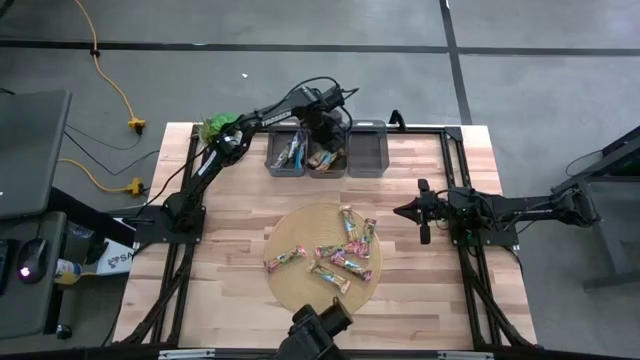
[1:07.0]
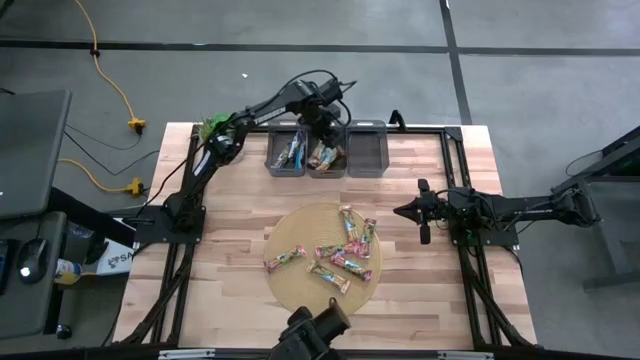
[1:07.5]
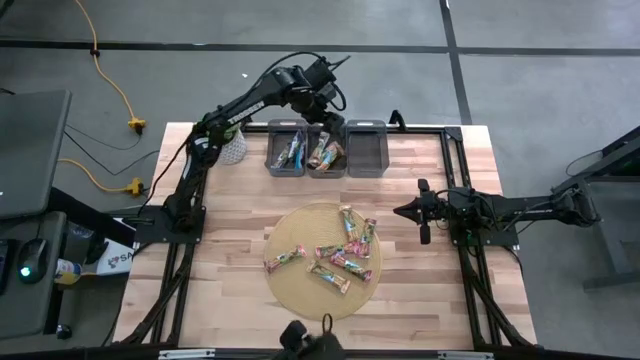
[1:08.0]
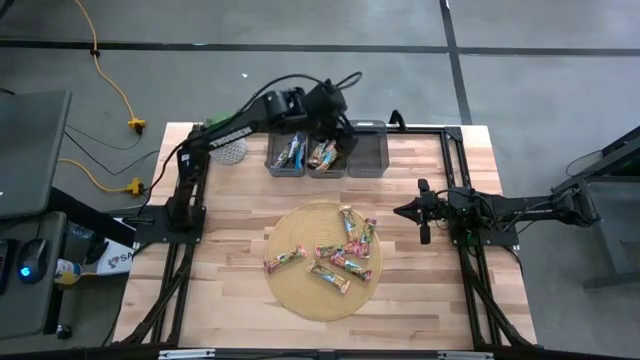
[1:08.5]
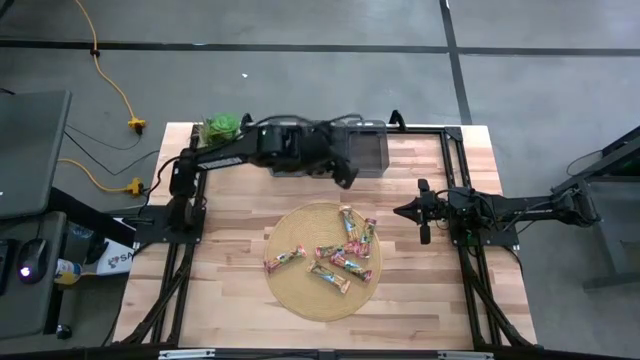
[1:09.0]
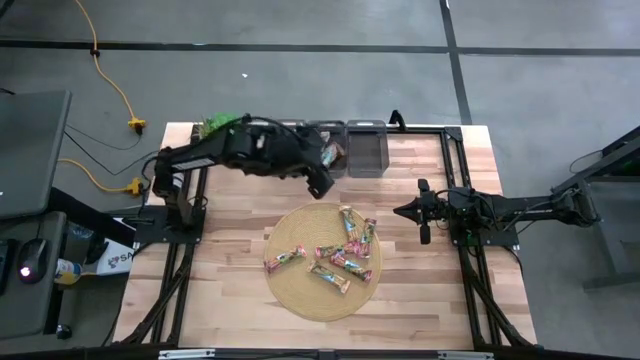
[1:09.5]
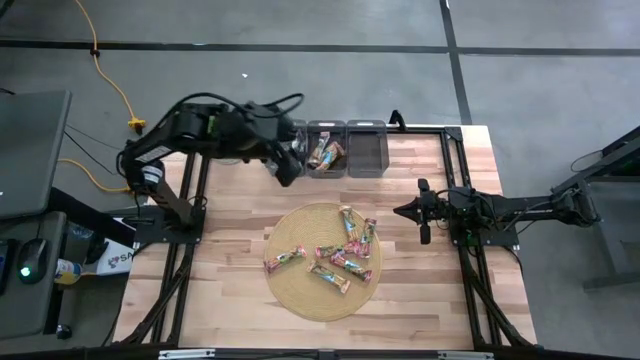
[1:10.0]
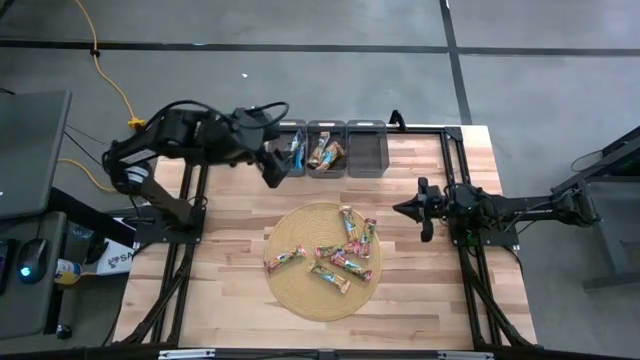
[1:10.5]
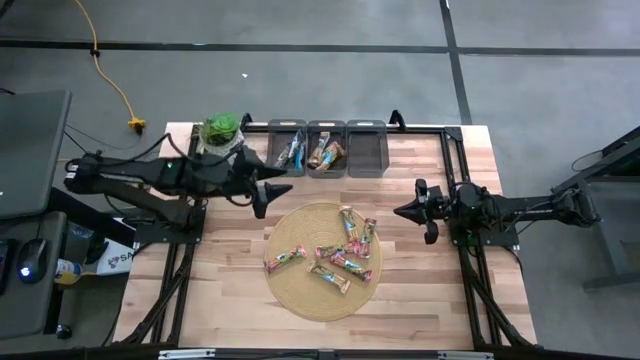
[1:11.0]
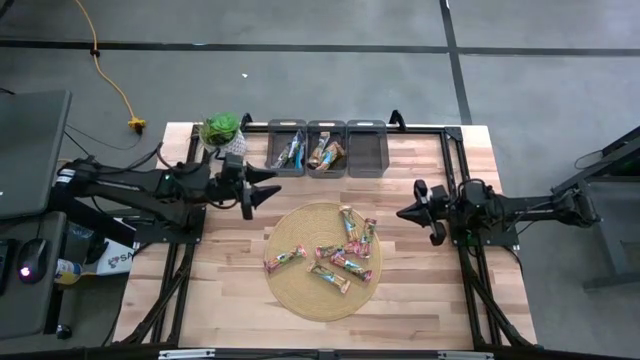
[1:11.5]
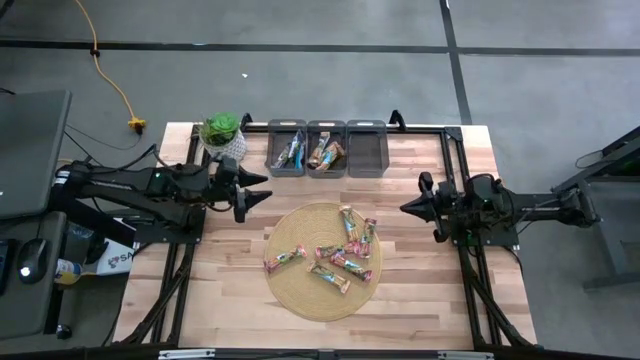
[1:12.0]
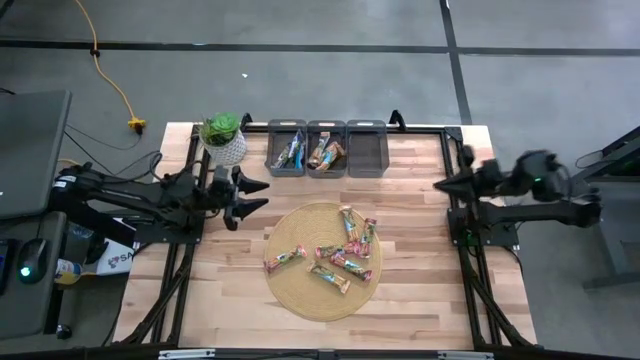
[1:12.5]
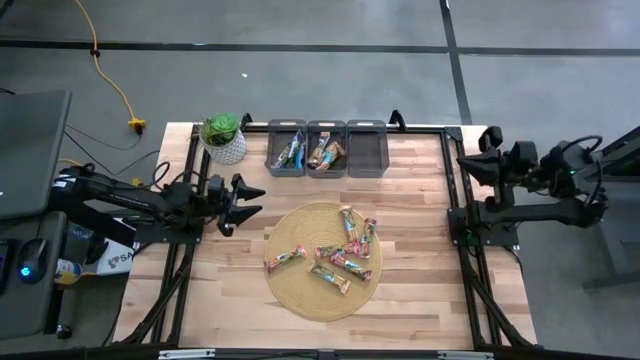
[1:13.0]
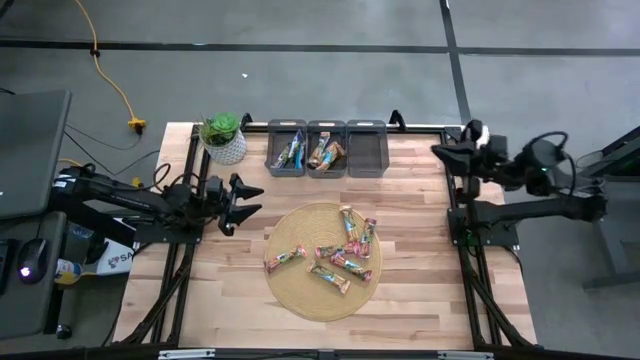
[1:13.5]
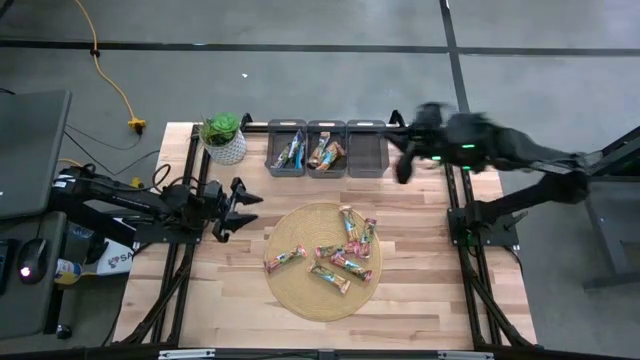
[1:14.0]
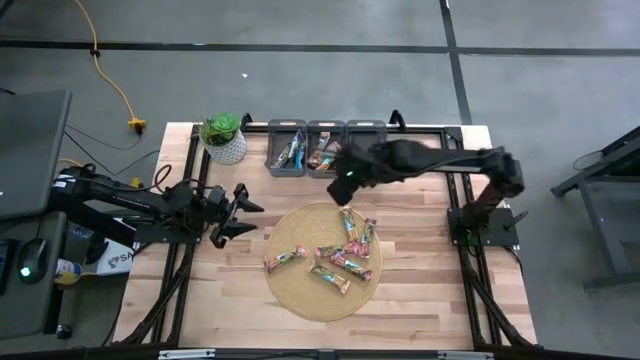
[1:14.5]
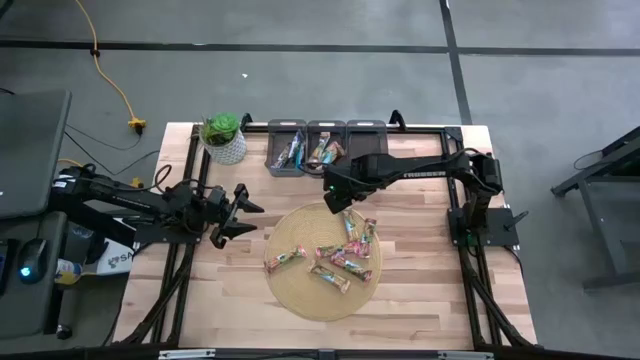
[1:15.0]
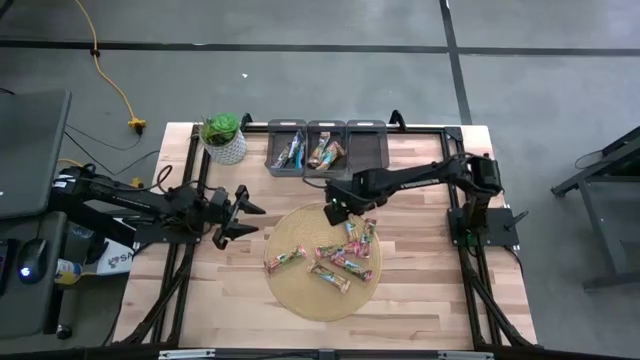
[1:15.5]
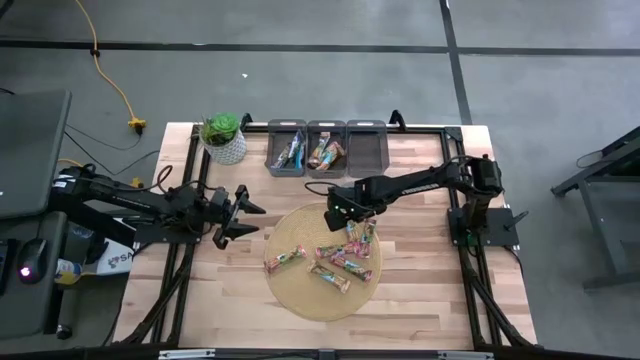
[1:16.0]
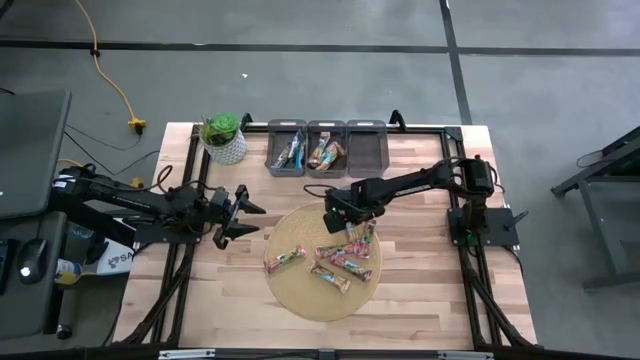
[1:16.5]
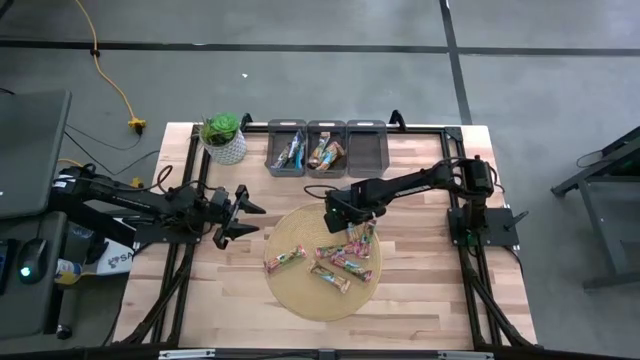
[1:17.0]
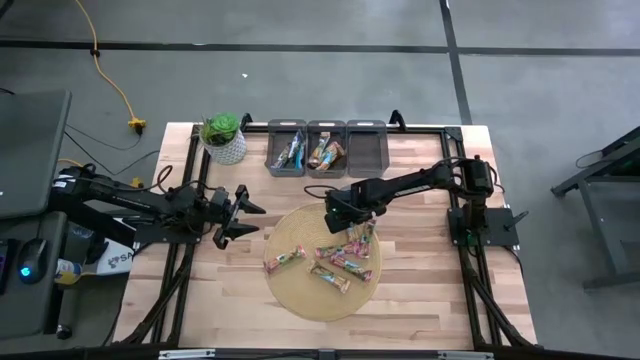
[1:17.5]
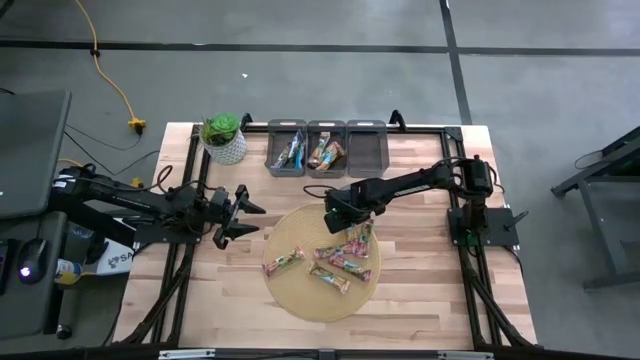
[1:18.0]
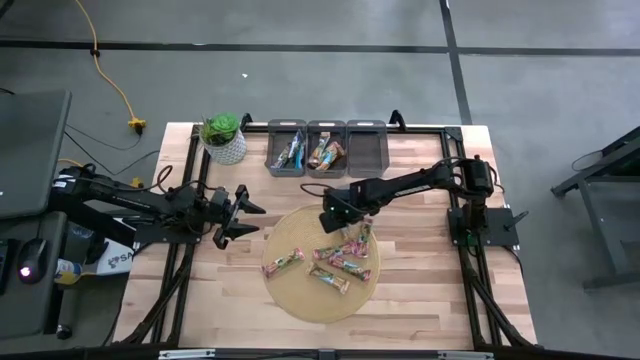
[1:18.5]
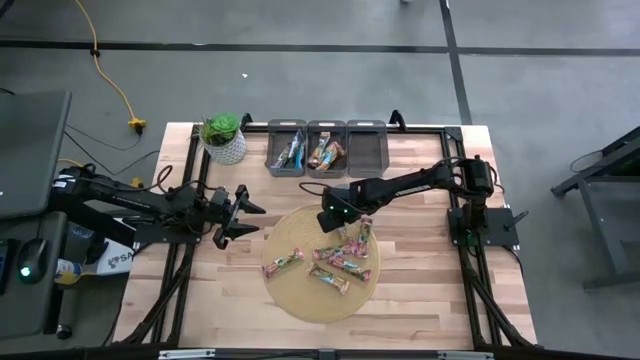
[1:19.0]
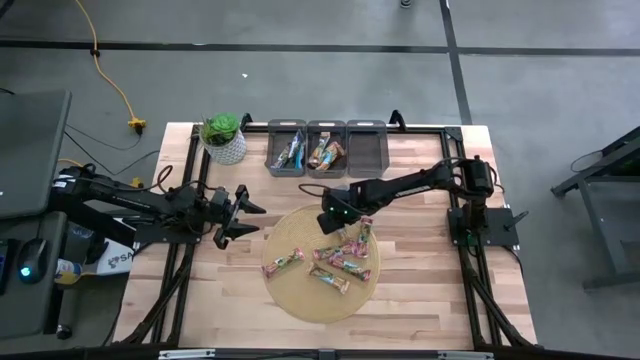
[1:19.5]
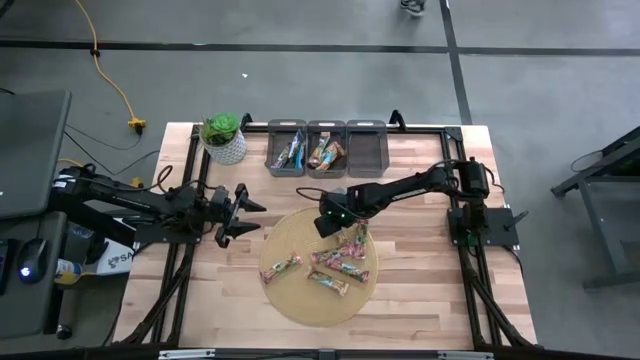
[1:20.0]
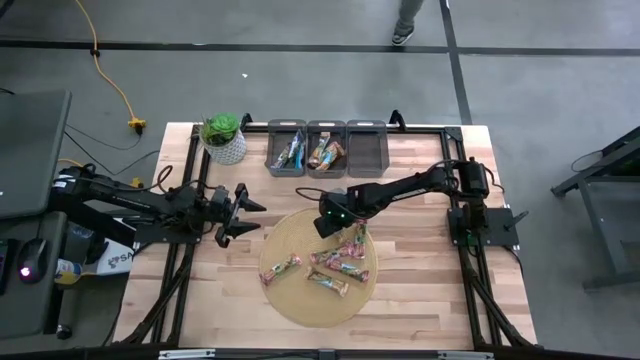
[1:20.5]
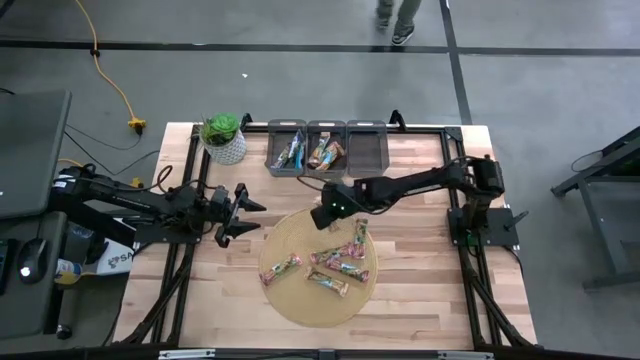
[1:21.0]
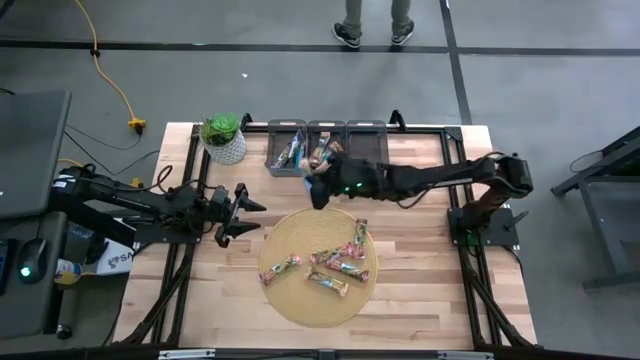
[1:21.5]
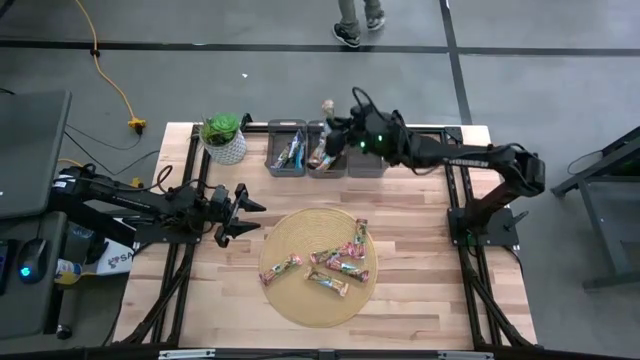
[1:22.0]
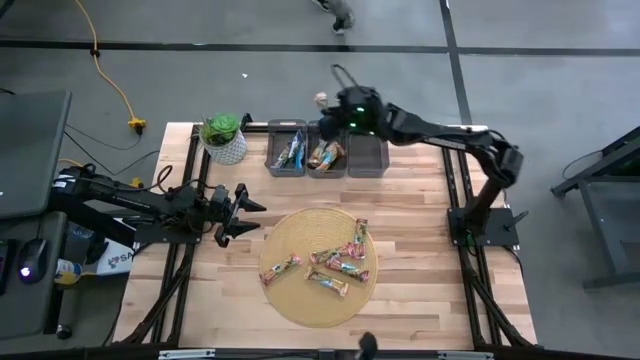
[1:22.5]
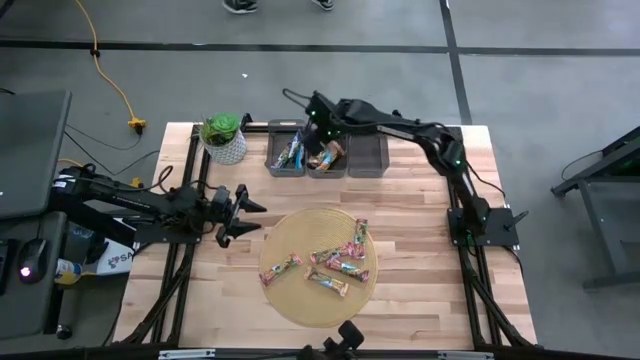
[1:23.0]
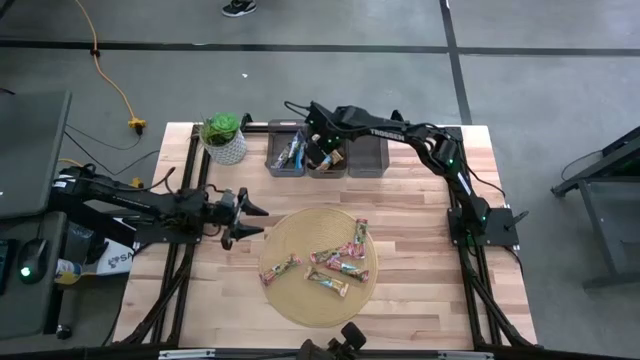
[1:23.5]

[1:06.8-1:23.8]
Task: Pick and place Granola Bars by type
Put the yellow granola bar into the middle black bin

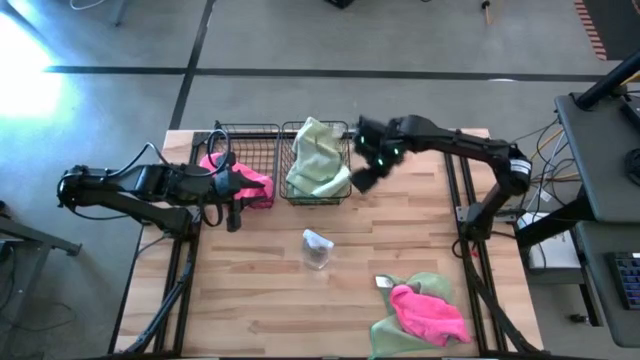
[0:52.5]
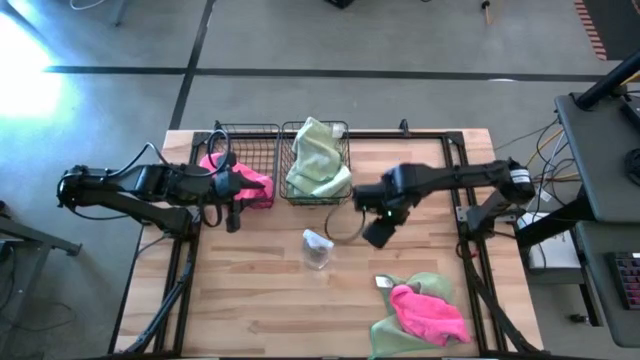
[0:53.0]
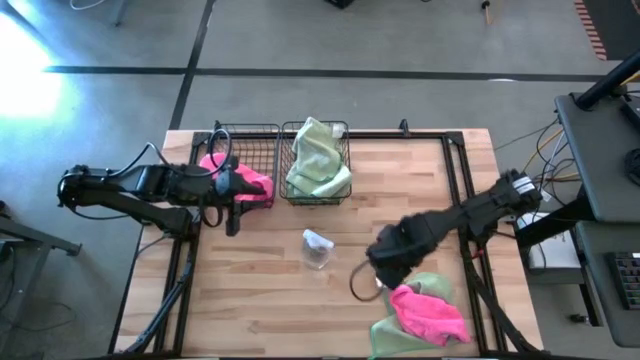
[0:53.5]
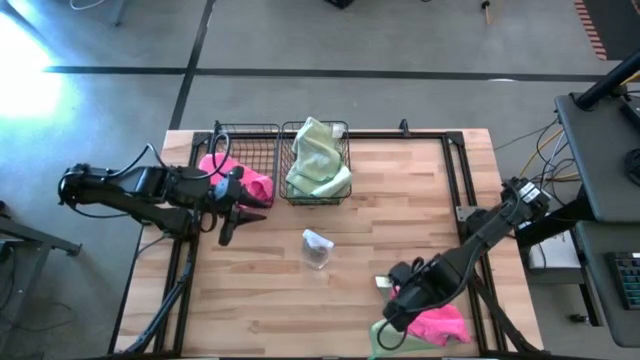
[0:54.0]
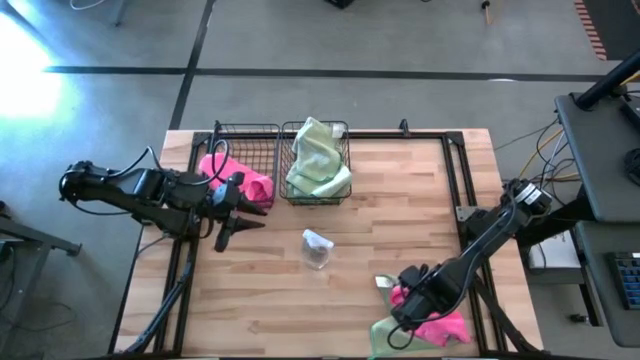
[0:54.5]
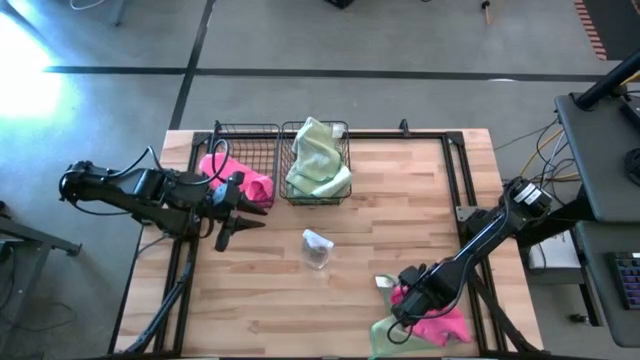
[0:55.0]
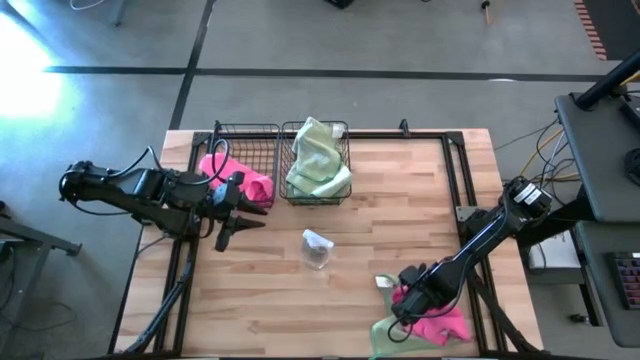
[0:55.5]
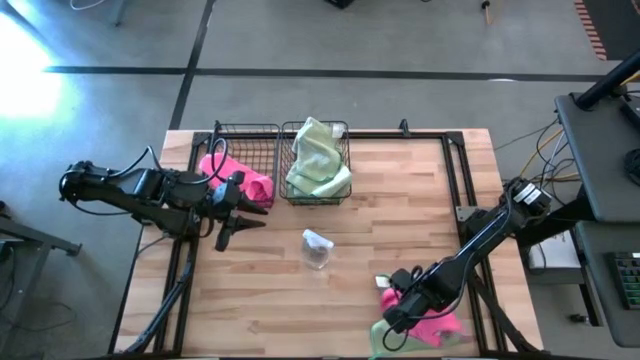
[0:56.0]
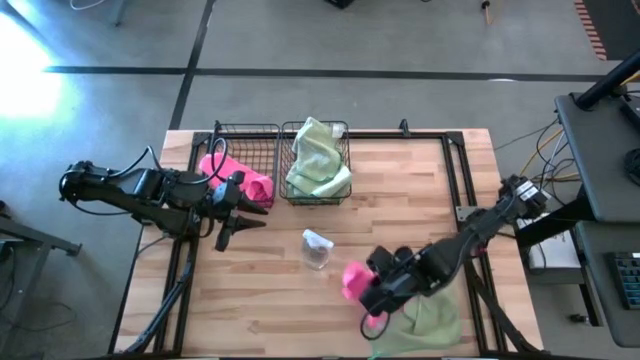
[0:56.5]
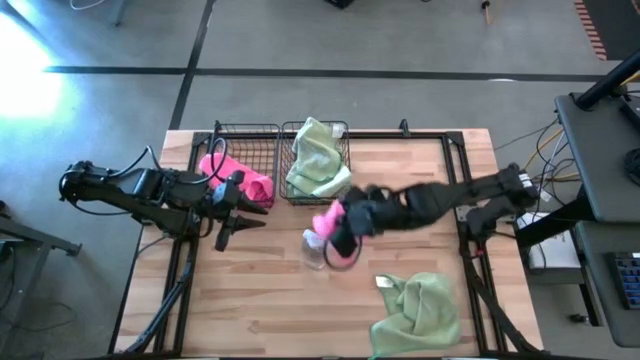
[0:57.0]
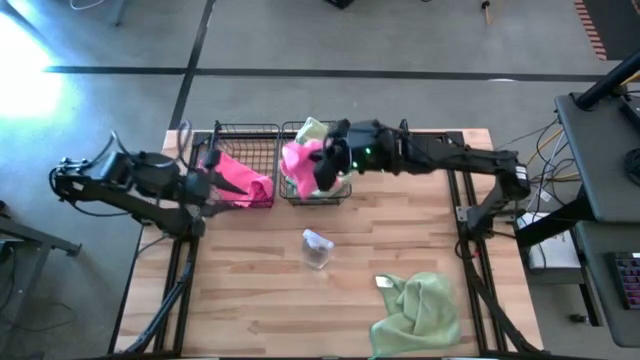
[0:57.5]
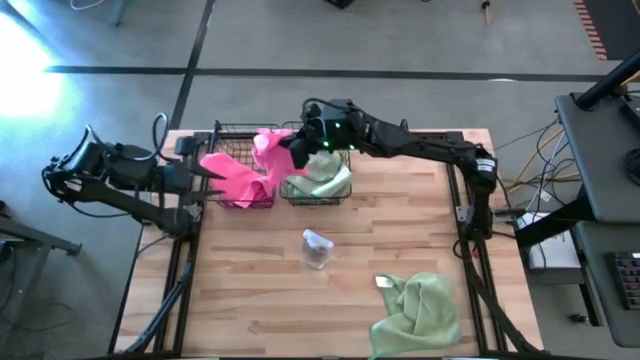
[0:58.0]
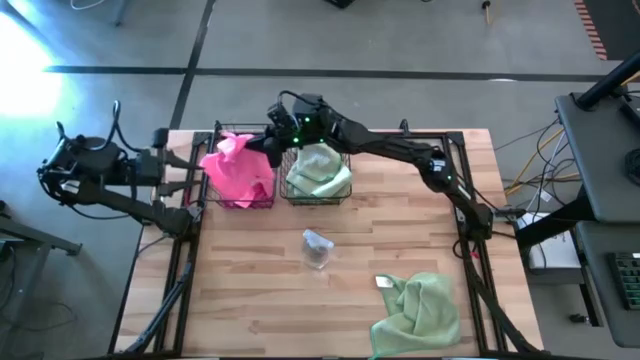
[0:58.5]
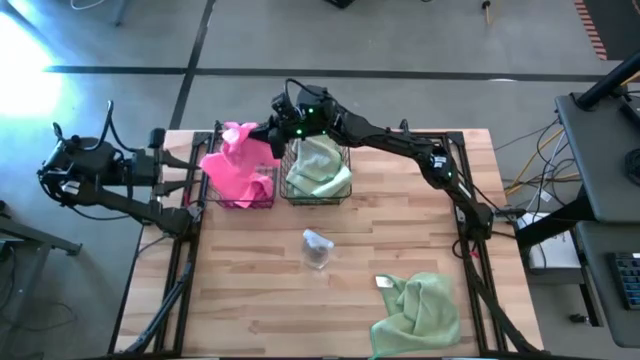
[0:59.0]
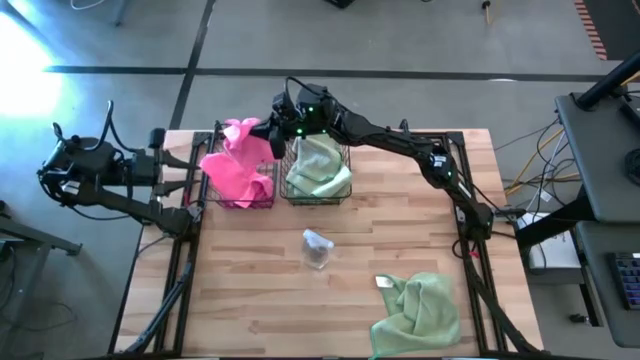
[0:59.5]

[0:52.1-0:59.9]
Task: Sort microfiber towel by color & place in baskets
Put the pink microfiber towel into the left black wire basket
